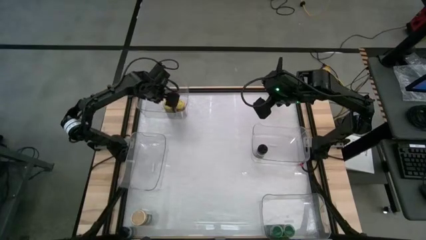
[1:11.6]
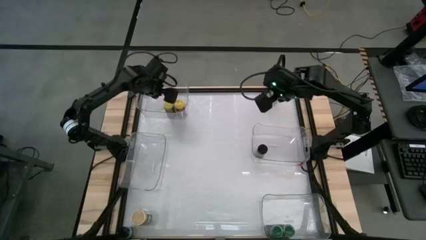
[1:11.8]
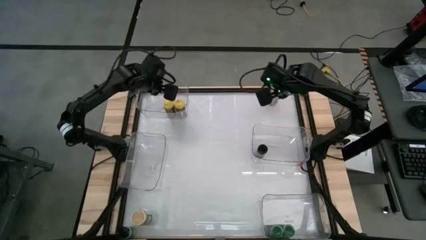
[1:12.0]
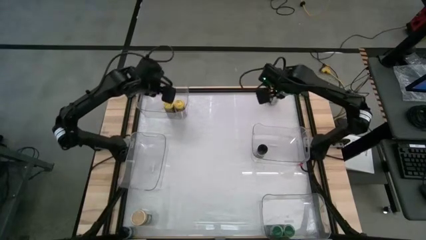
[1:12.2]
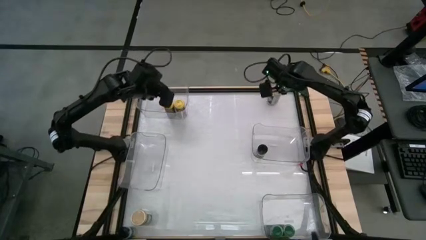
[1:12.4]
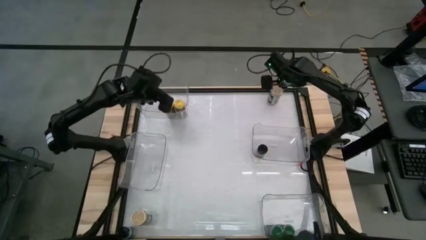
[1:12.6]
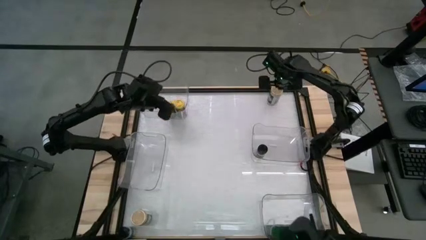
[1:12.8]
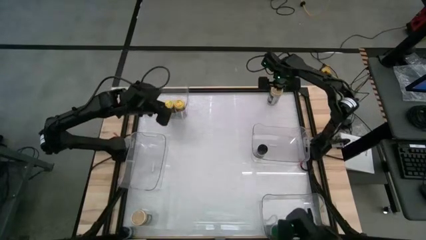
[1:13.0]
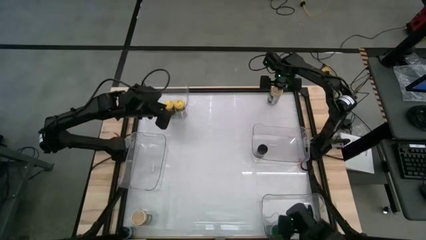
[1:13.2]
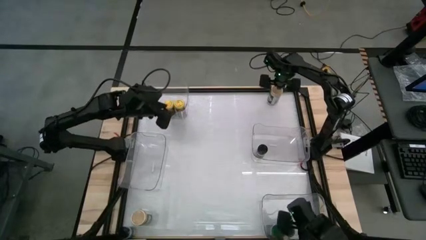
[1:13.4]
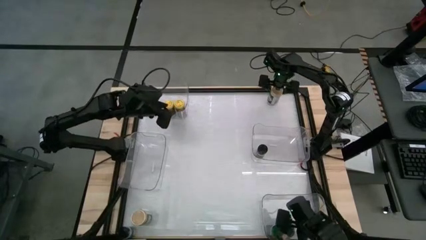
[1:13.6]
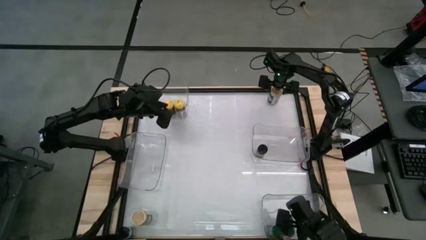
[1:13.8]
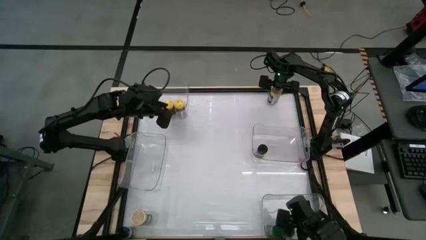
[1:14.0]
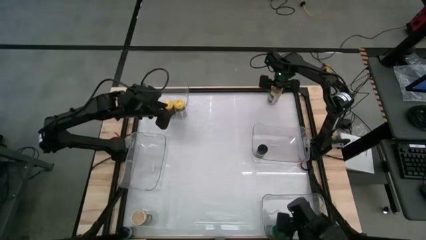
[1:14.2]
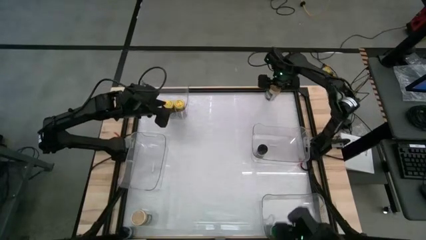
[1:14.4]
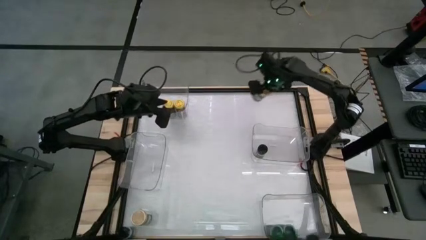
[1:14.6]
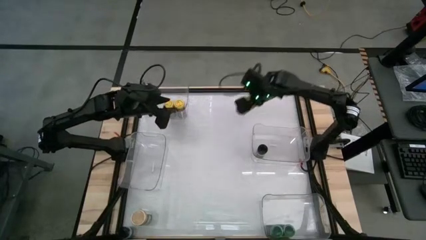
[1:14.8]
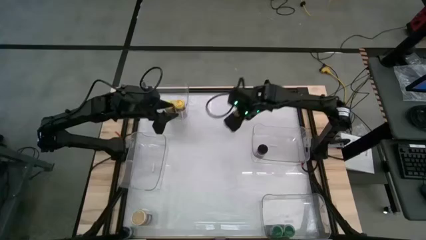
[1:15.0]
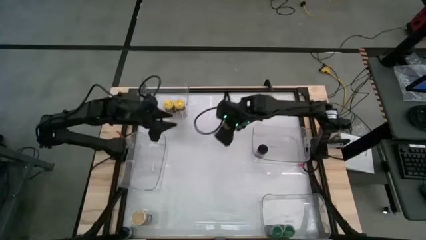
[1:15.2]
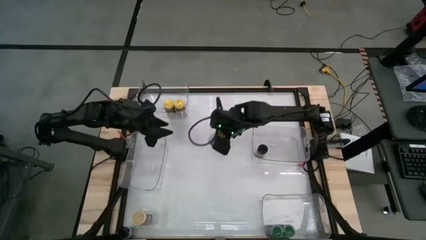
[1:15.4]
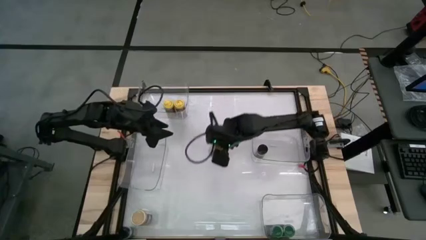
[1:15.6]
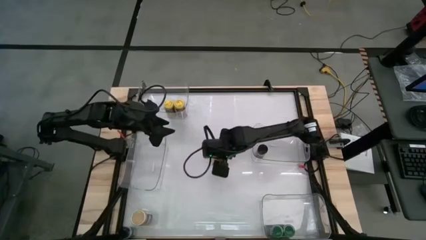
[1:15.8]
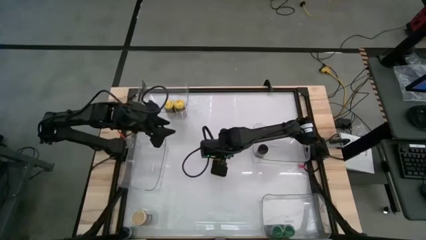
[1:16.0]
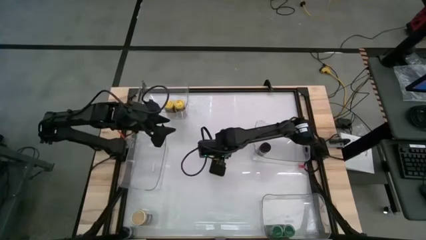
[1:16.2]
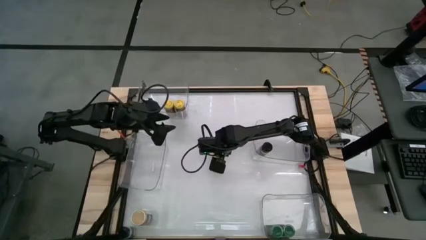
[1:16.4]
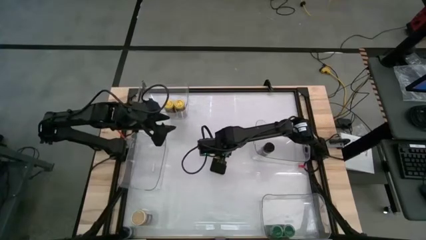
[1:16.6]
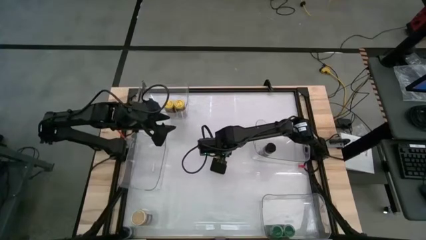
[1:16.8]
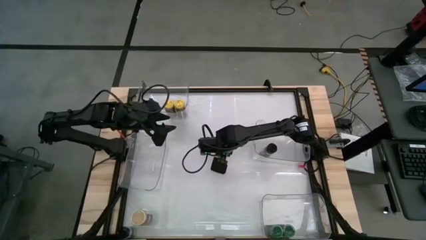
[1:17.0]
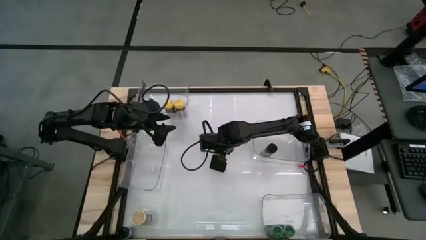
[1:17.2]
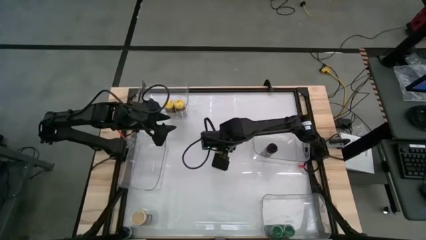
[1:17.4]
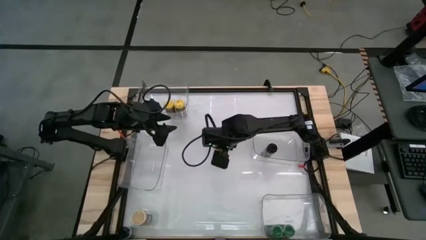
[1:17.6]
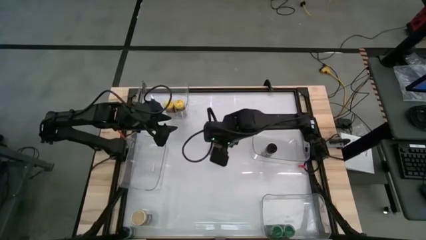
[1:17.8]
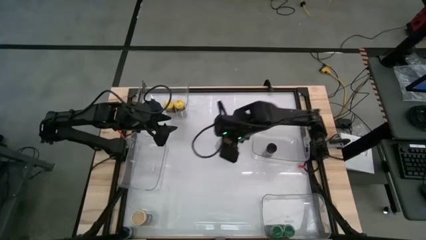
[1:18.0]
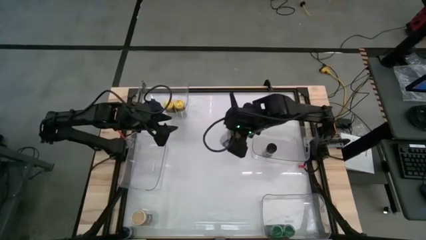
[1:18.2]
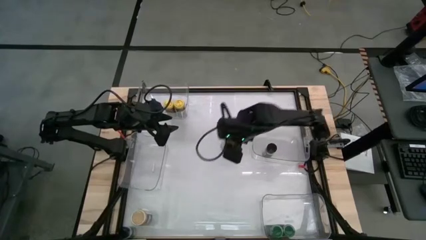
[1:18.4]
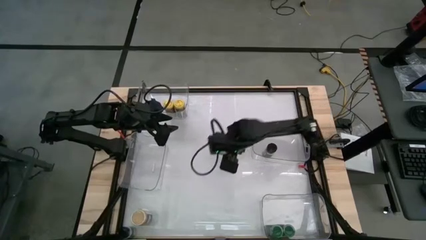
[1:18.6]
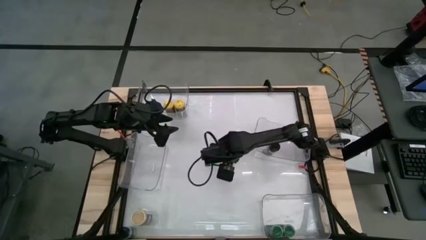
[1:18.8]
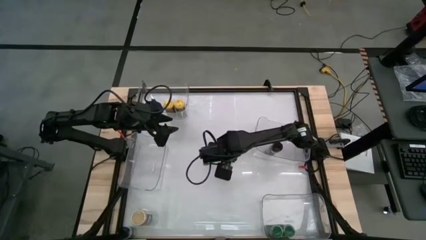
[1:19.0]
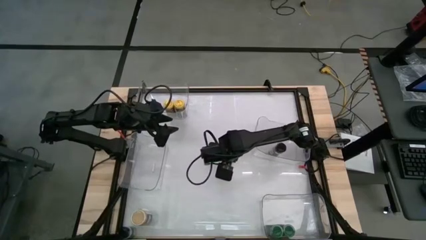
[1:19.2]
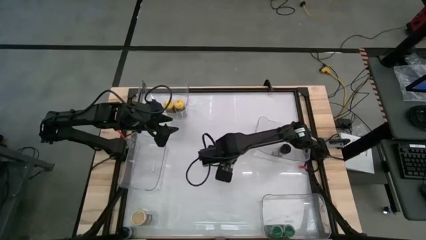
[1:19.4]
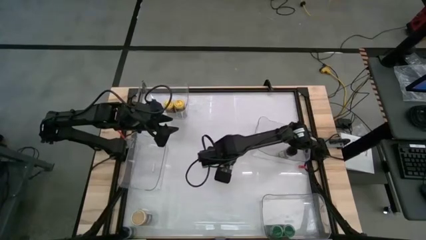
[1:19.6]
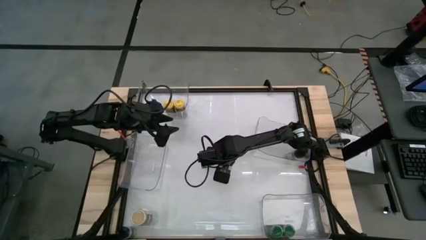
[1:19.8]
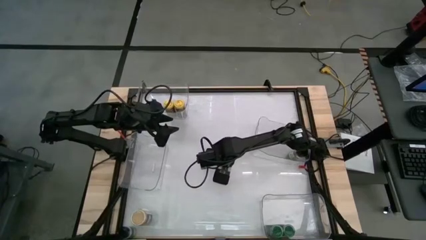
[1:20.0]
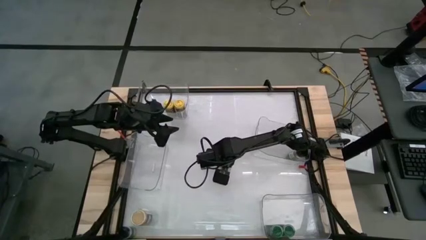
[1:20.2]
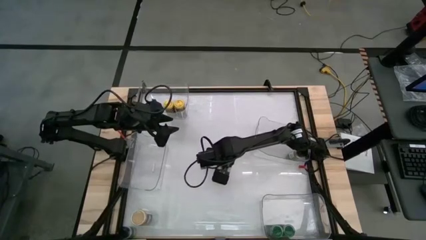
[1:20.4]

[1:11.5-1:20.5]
Task: Sort spices by type
Move the top gold seasoning bottle to the center of the table

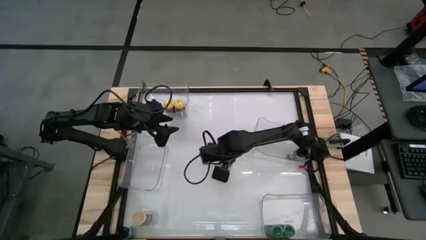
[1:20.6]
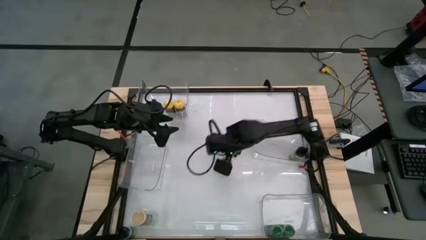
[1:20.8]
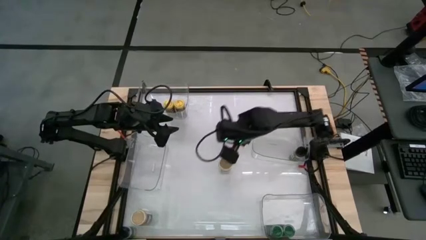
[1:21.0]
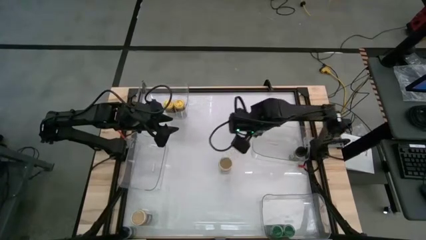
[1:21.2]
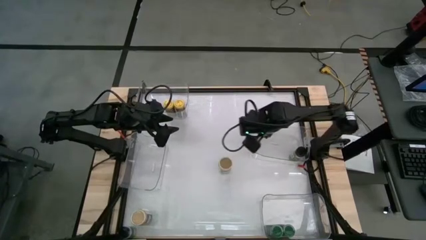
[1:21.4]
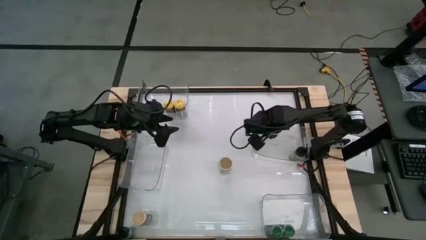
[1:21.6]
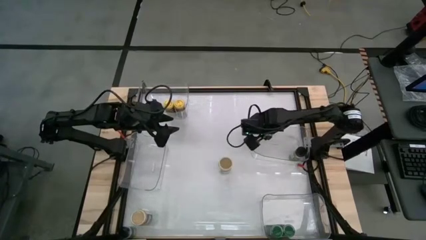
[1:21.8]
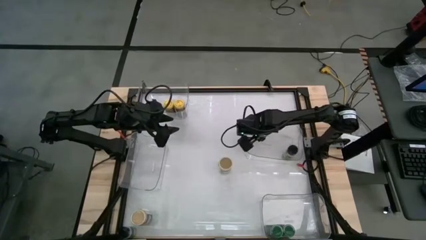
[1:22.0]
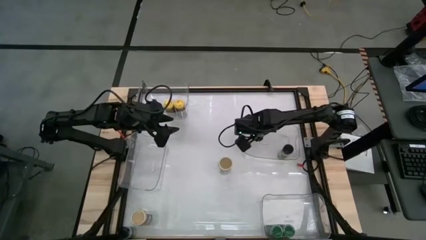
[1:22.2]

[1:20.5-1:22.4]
Adjust the middle right transparent bin

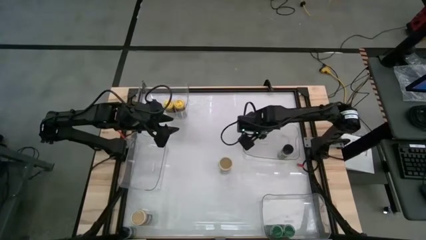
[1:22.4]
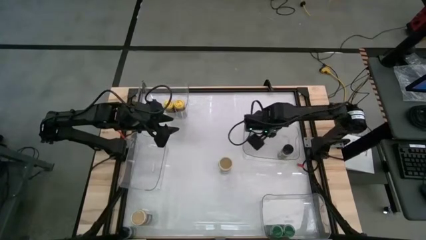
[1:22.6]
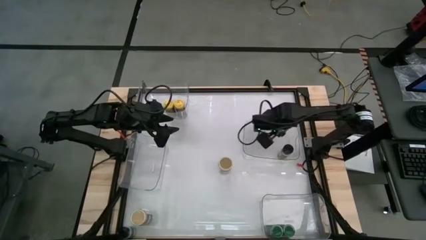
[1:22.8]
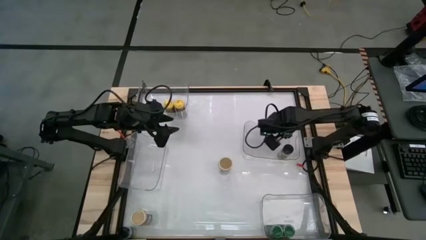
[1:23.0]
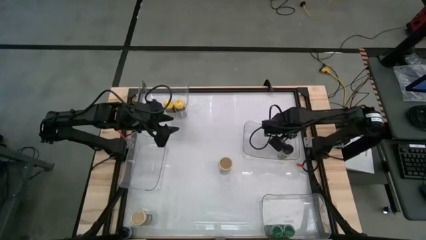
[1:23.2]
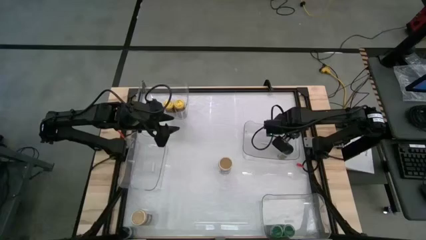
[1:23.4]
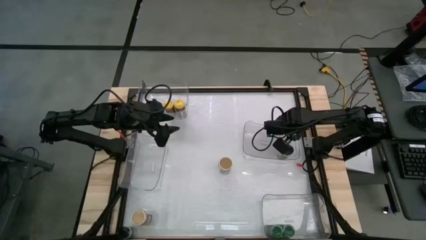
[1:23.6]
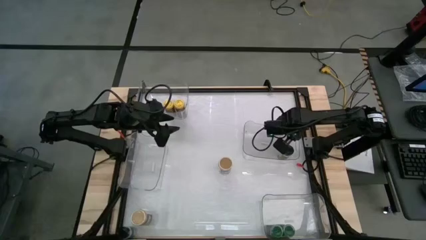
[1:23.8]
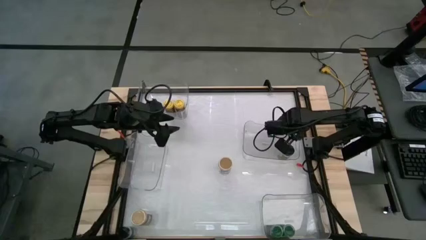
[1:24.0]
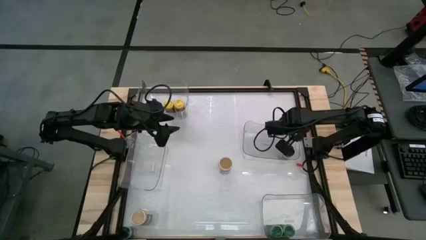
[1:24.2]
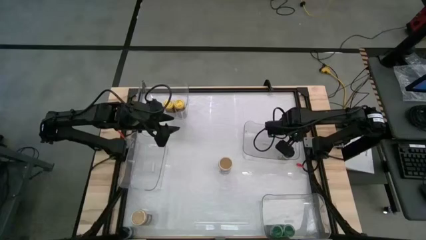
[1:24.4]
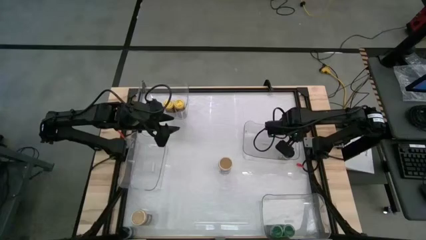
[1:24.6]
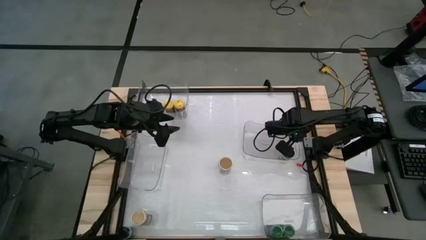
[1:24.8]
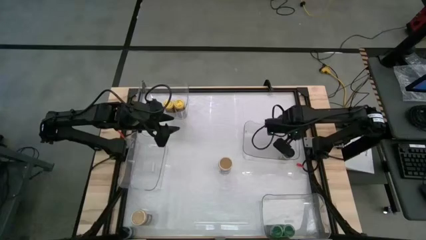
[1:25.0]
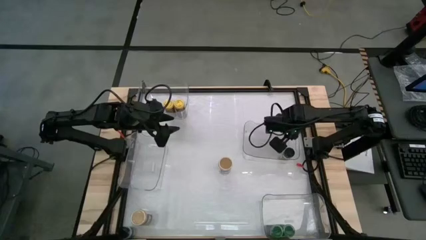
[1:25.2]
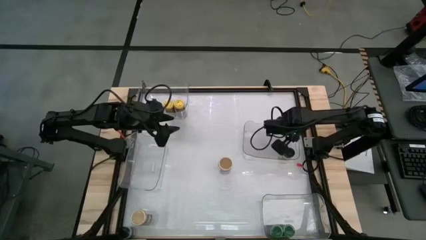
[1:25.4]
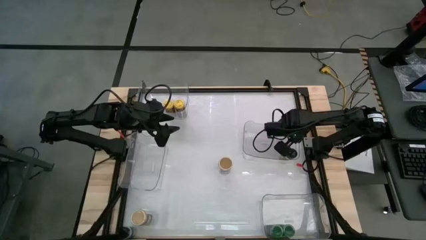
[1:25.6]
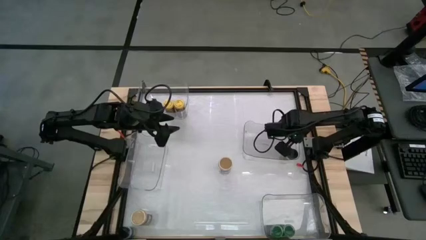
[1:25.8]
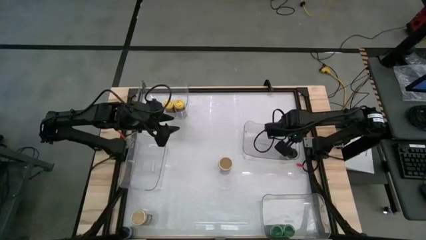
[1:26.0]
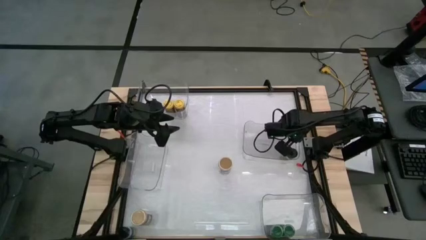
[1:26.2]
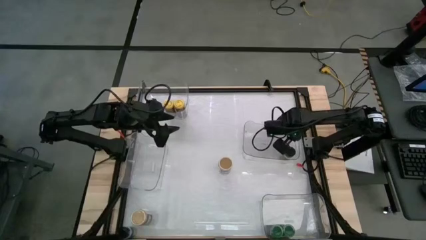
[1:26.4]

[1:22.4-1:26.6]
Adjust the black seasoning bottle in the middle right transparent bin
